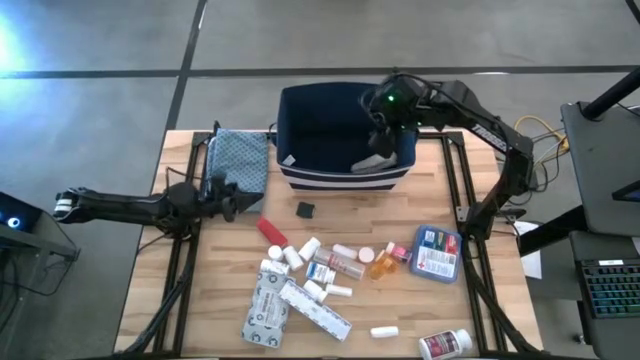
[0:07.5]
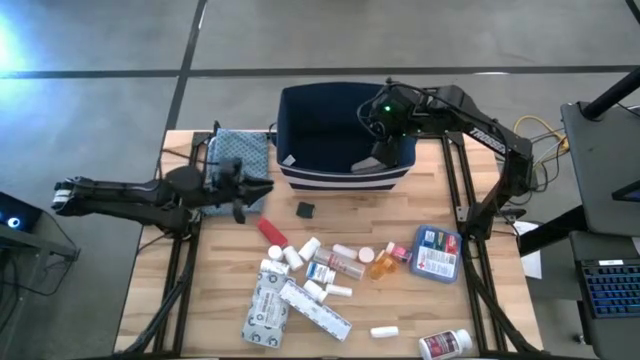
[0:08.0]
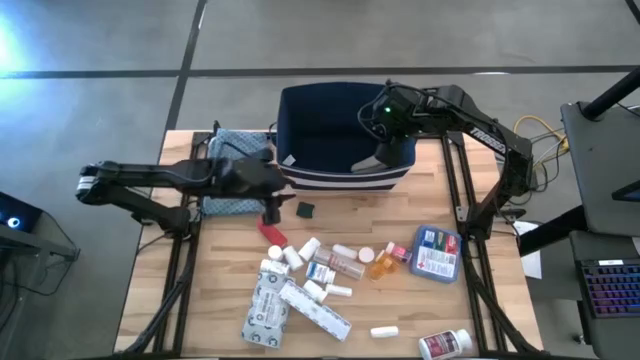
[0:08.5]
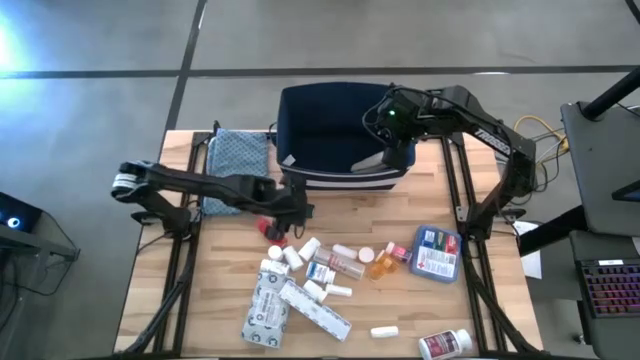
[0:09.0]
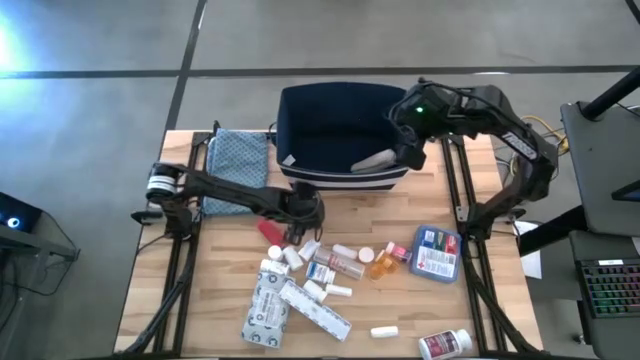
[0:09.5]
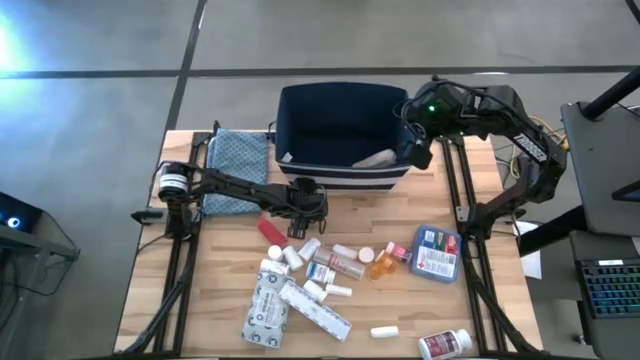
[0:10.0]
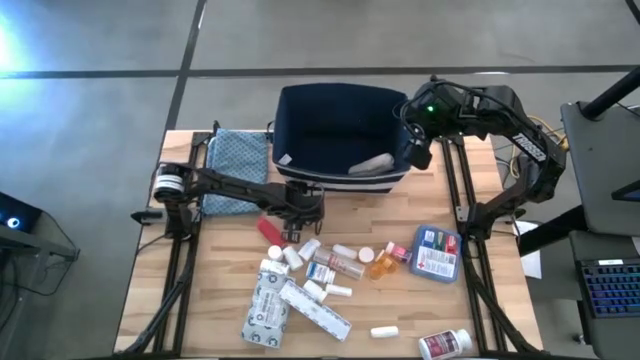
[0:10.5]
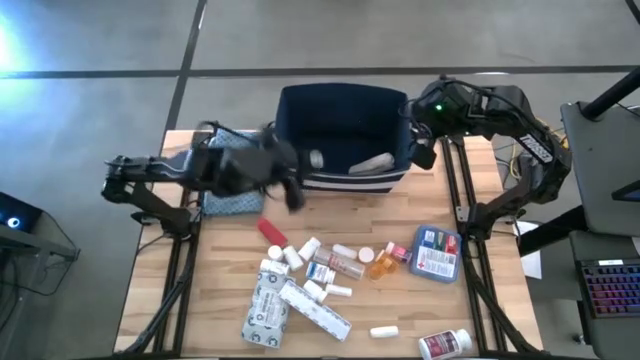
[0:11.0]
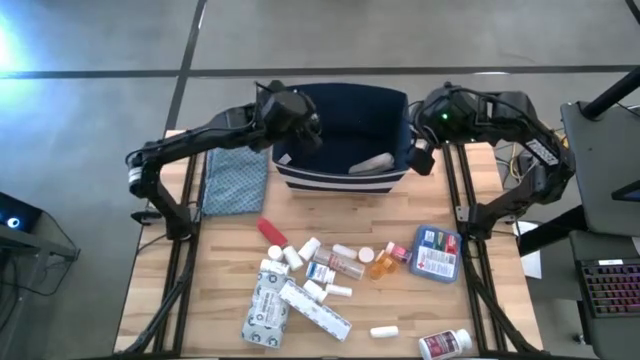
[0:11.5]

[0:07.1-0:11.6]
Task: Pick & place medical supplies in basket/bin
Put the green bandage into the bin

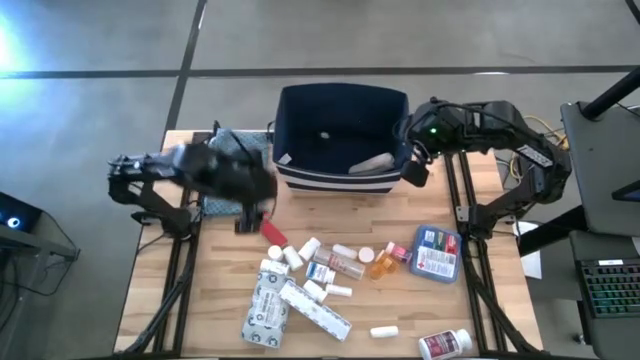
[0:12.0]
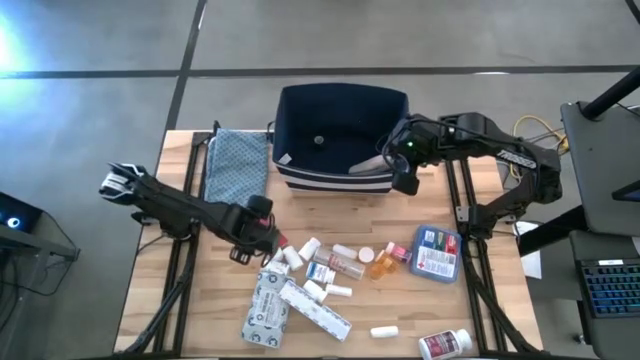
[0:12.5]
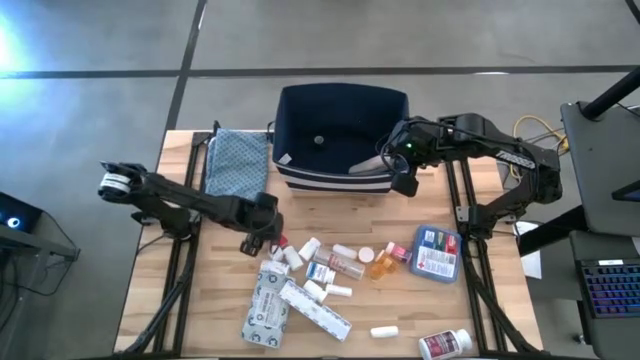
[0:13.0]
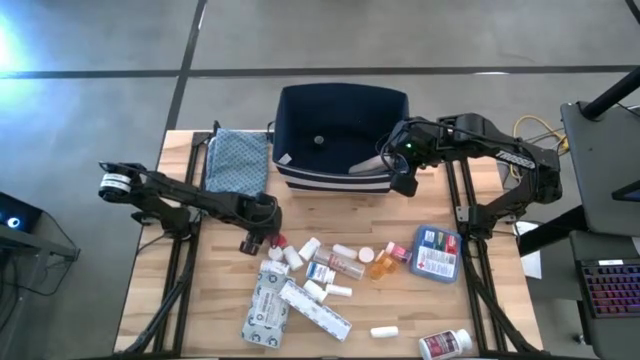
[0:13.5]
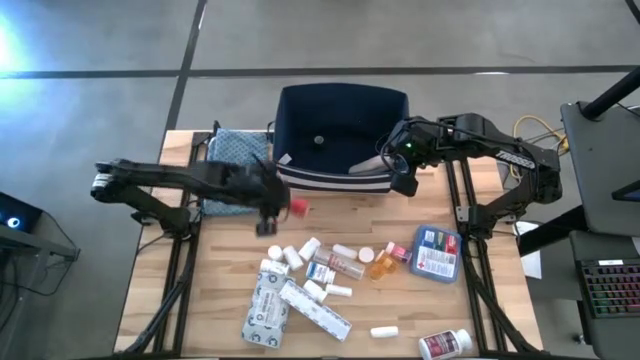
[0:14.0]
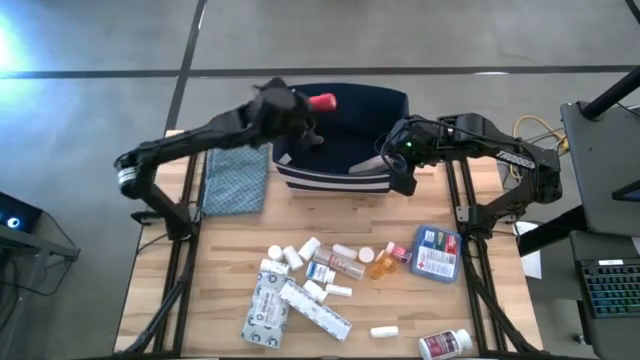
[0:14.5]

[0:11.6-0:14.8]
Put the red bandage into the bin

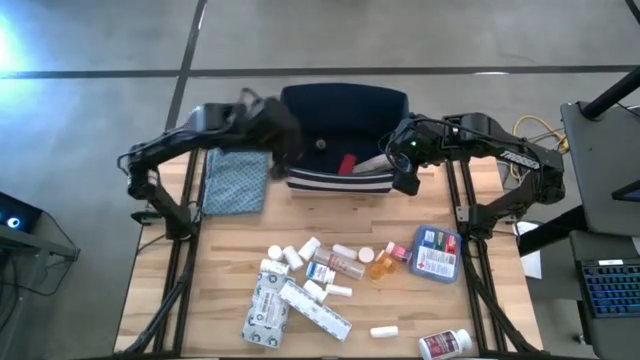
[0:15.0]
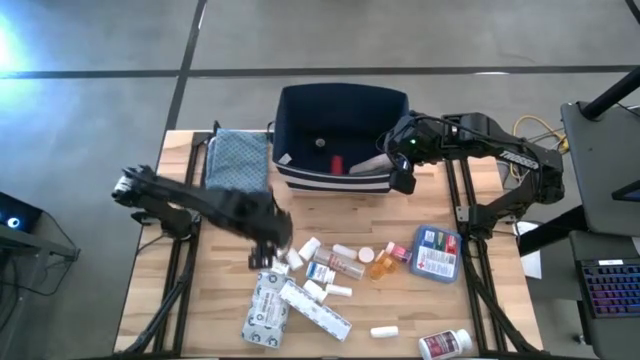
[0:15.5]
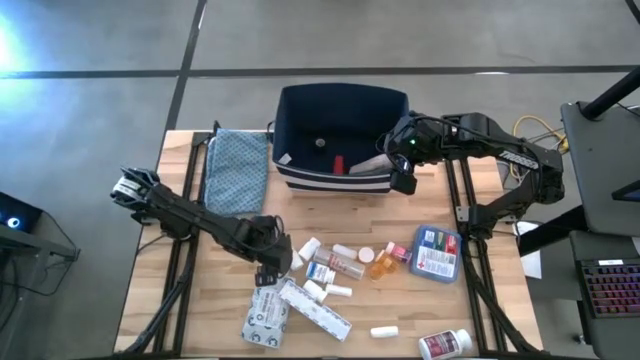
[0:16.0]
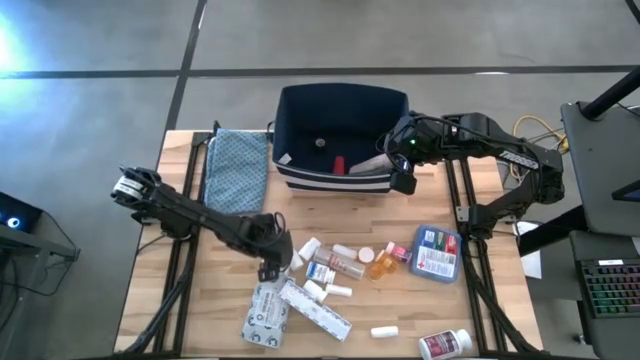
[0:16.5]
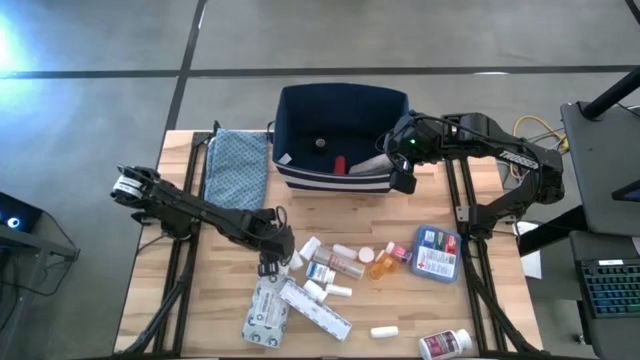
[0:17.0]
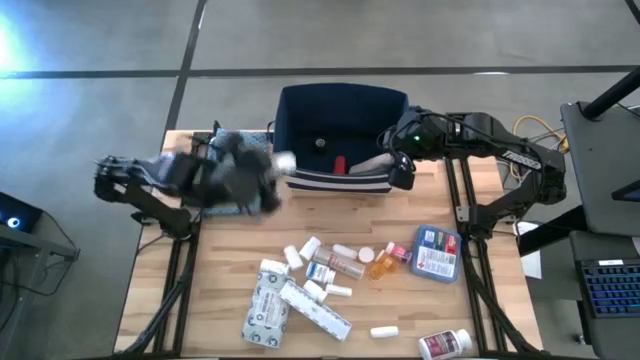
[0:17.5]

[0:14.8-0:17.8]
Put the white pill bottle into the bin

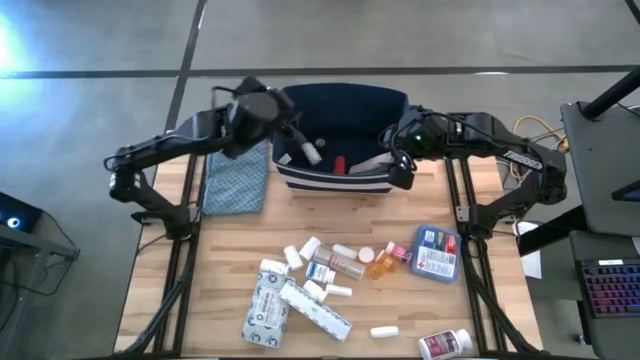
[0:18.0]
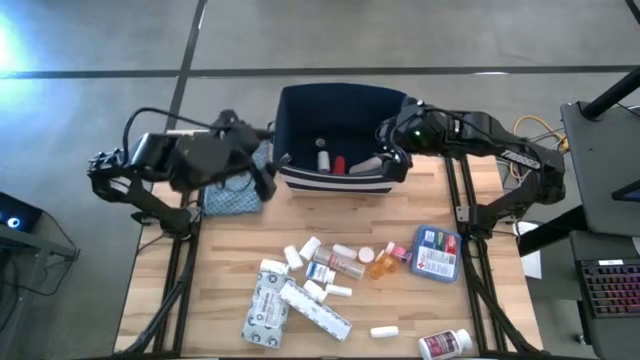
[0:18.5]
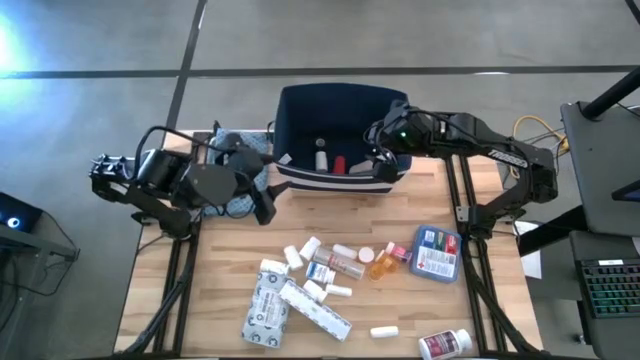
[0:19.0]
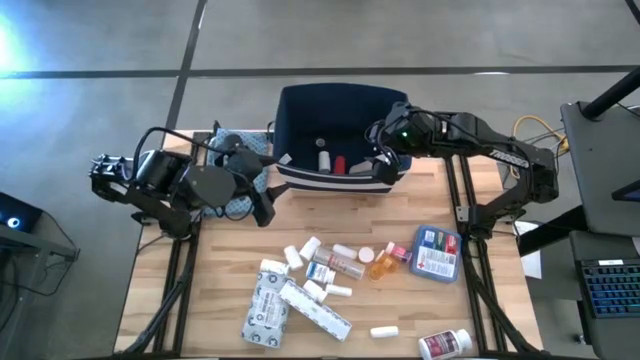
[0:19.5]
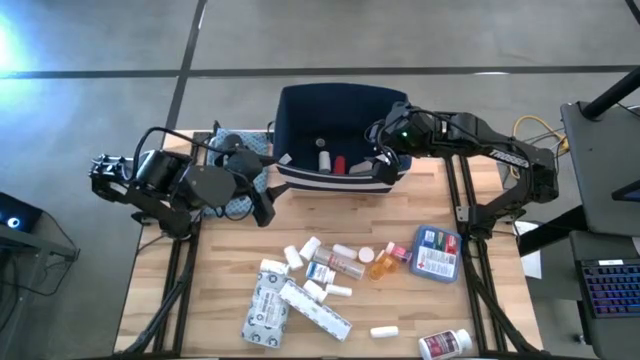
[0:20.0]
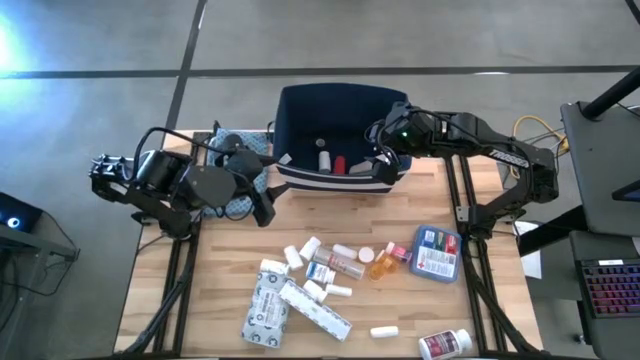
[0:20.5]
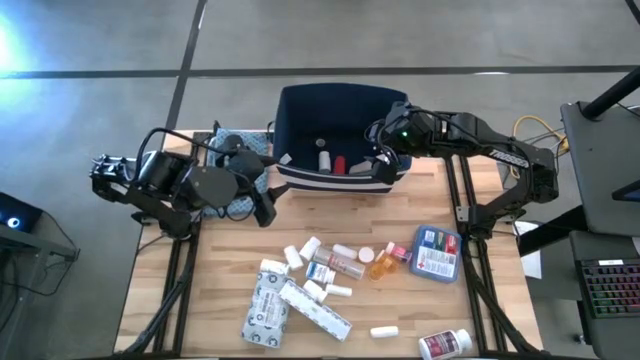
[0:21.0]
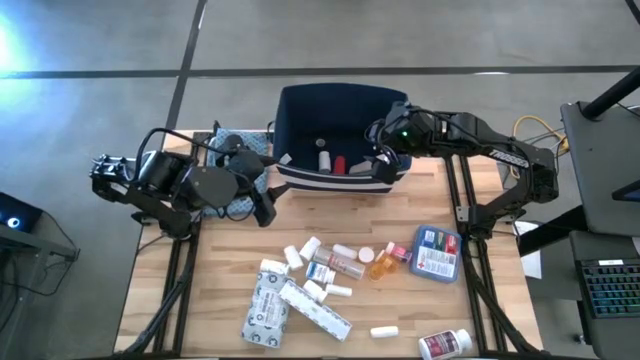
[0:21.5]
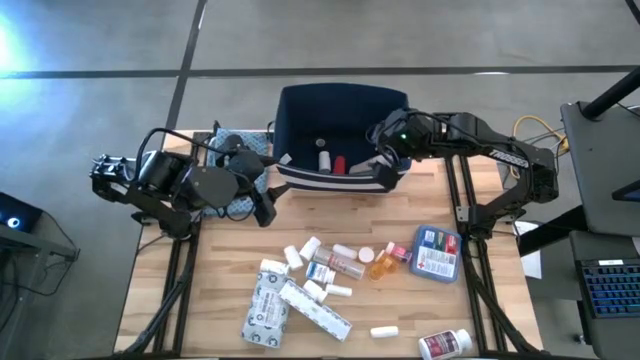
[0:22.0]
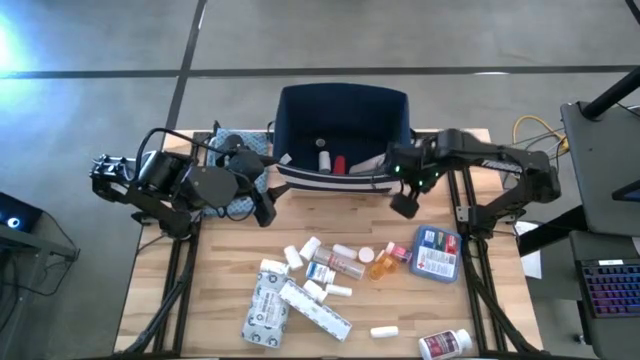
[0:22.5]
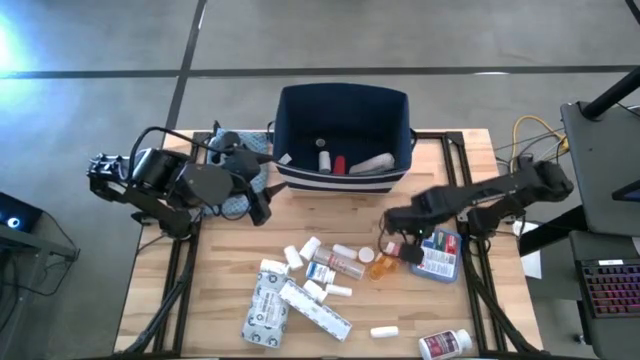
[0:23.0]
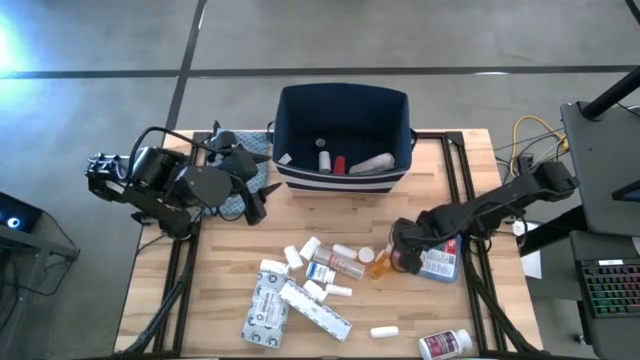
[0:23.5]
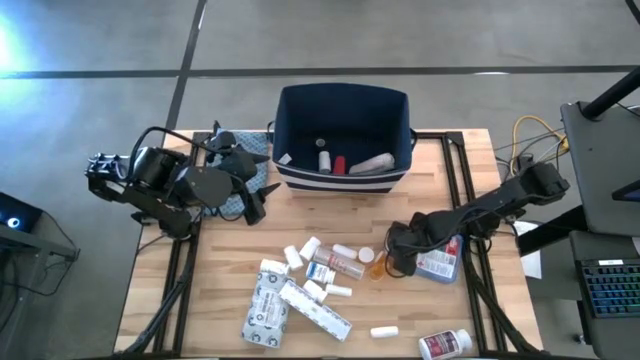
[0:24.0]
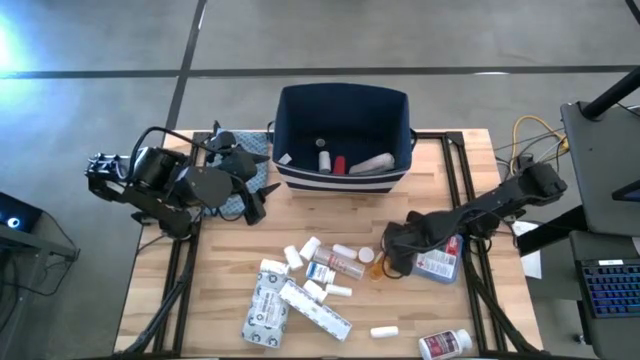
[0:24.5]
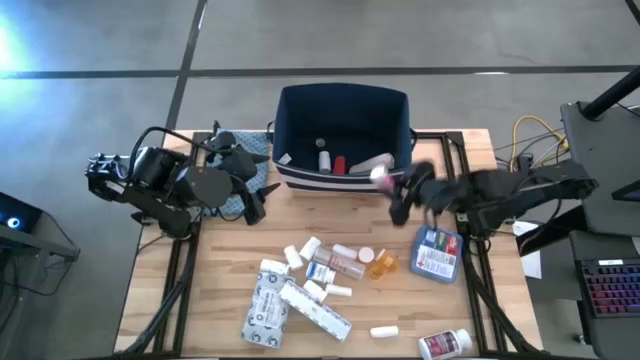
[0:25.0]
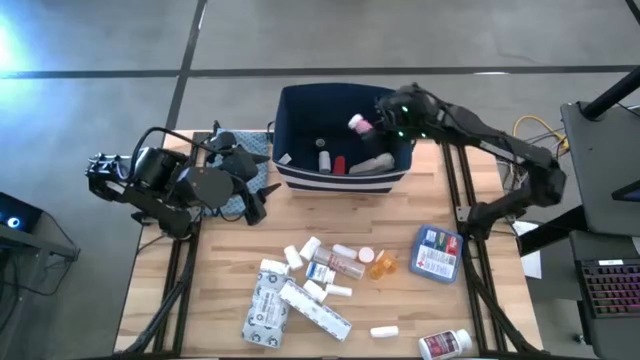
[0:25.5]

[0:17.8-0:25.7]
Put the pink pill bottle into the bin

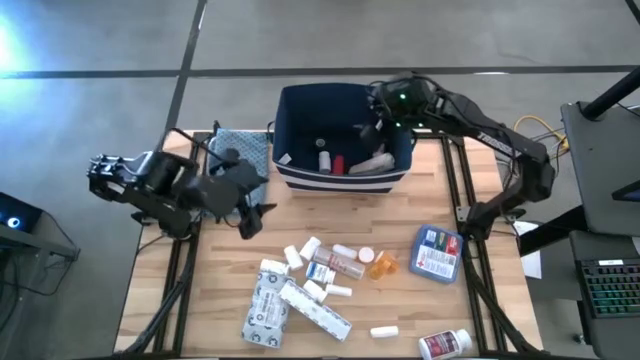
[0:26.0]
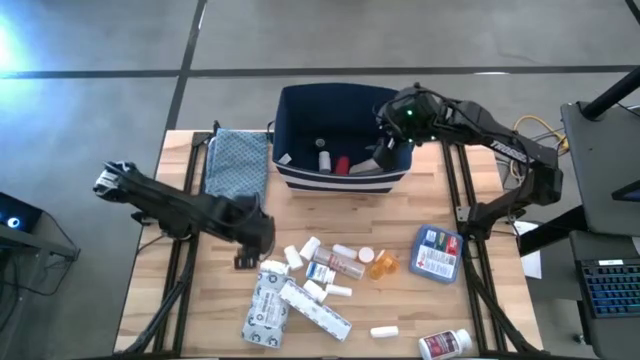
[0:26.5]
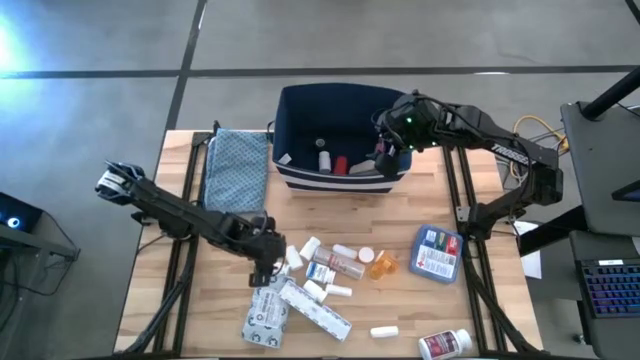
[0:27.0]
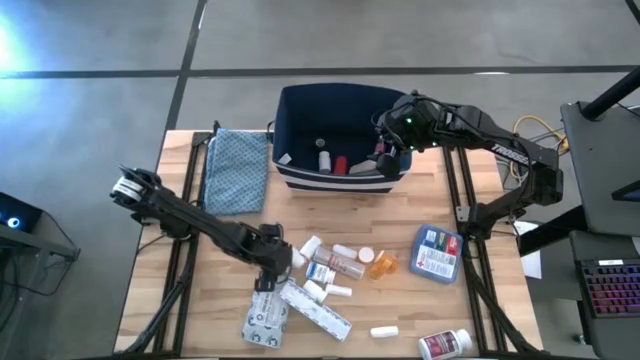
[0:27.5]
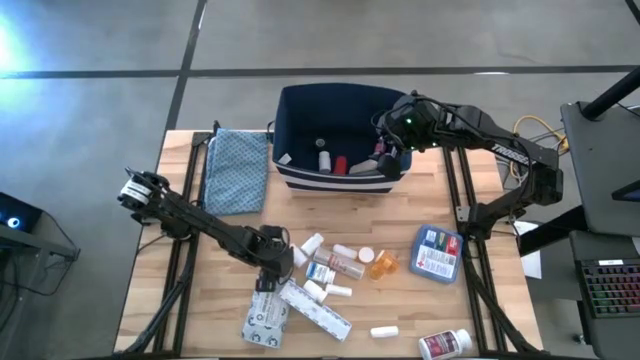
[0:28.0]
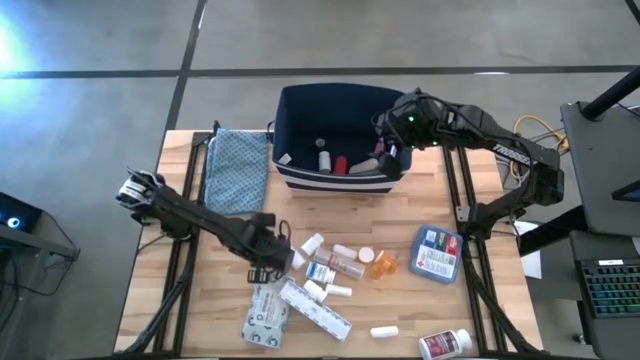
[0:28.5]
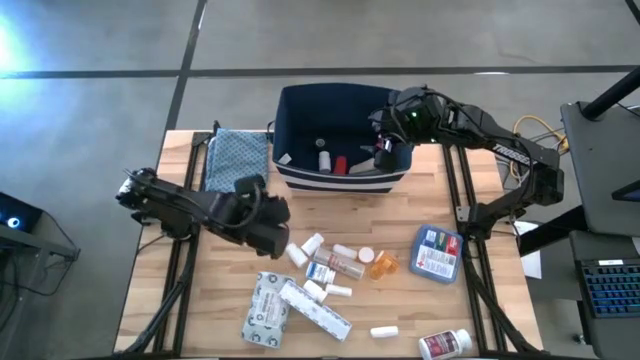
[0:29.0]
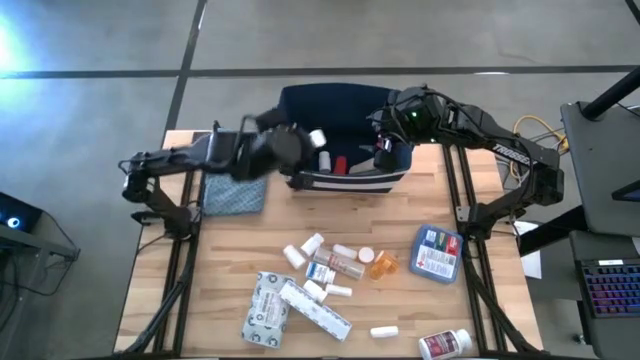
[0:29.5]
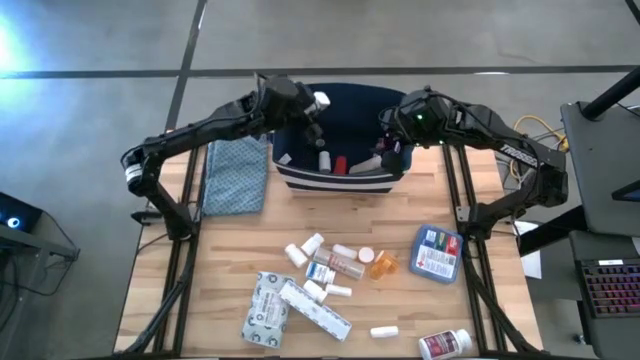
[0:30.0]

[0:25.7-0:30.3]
Put the white pill bottle into the bin
